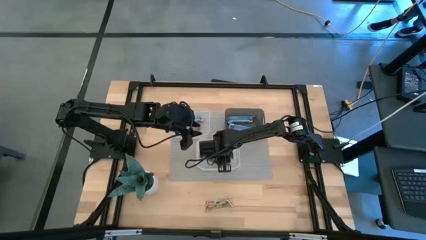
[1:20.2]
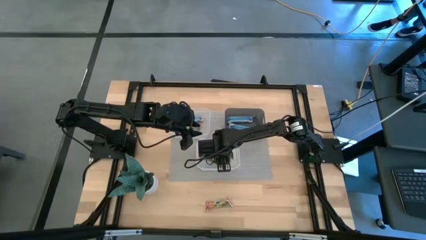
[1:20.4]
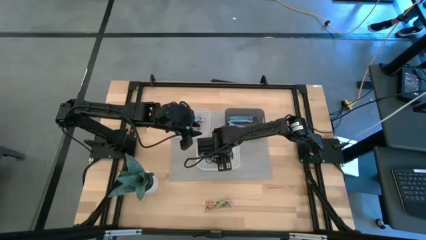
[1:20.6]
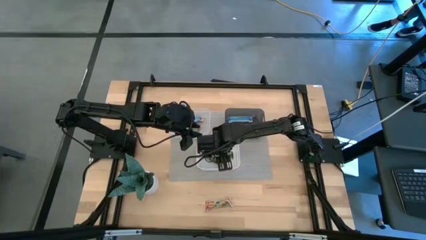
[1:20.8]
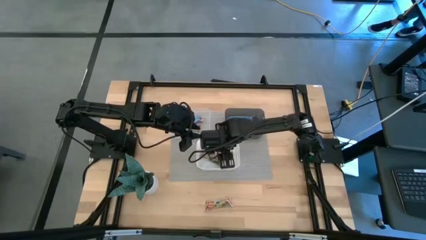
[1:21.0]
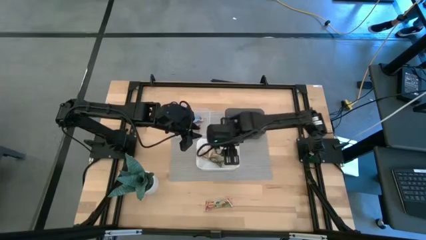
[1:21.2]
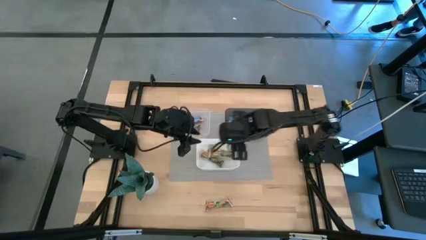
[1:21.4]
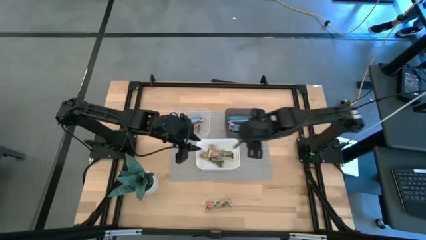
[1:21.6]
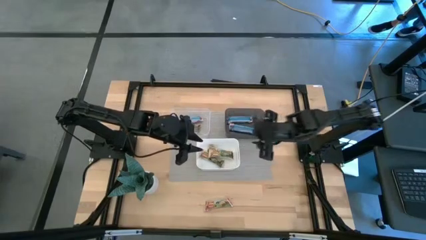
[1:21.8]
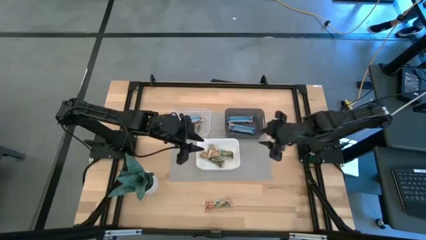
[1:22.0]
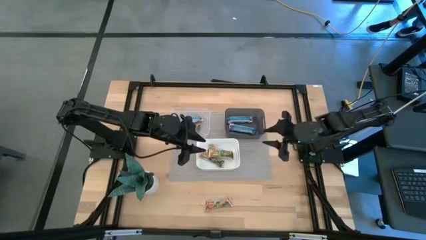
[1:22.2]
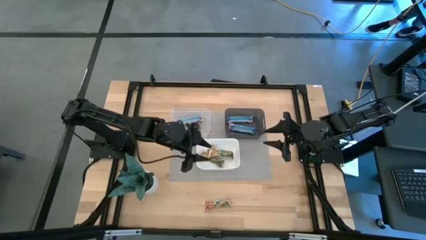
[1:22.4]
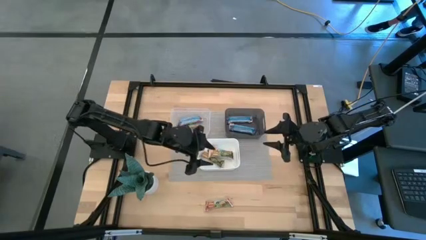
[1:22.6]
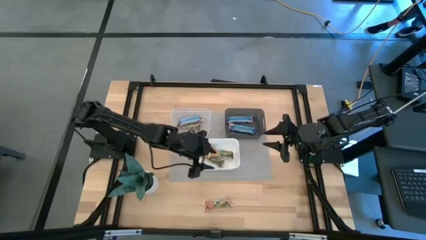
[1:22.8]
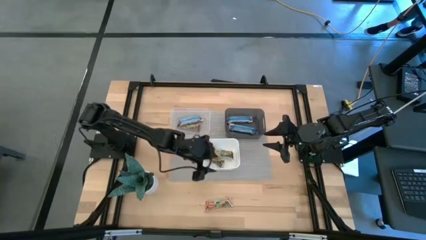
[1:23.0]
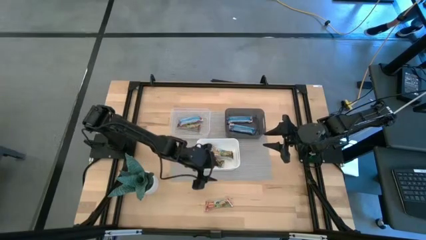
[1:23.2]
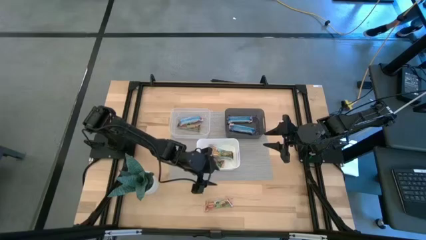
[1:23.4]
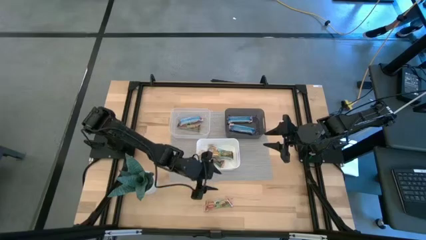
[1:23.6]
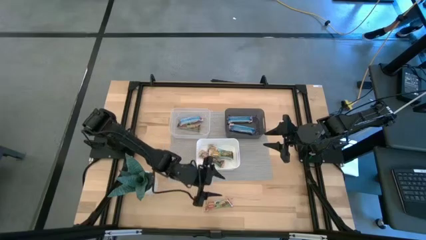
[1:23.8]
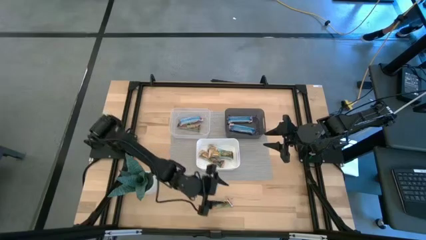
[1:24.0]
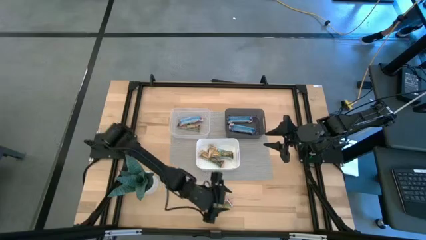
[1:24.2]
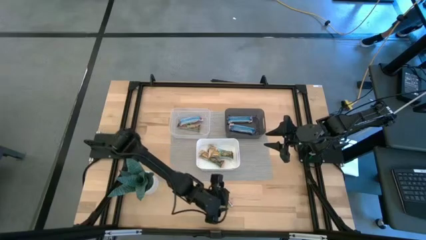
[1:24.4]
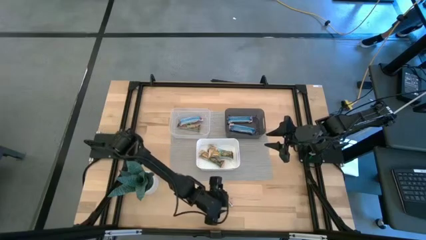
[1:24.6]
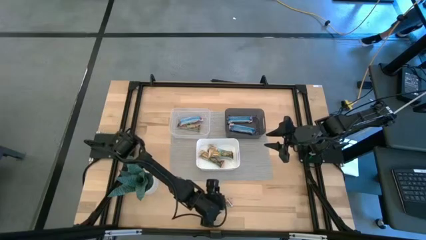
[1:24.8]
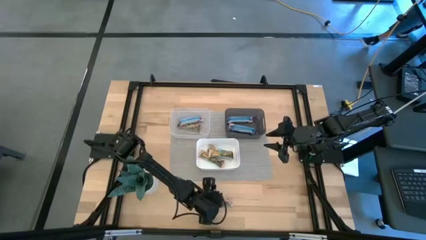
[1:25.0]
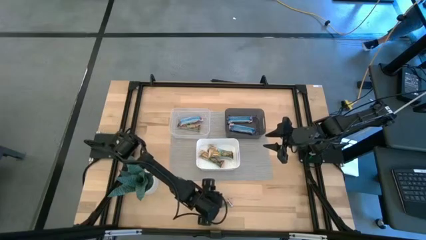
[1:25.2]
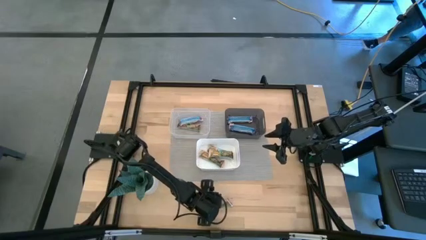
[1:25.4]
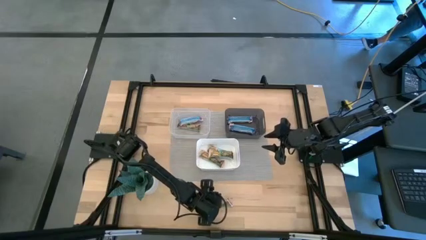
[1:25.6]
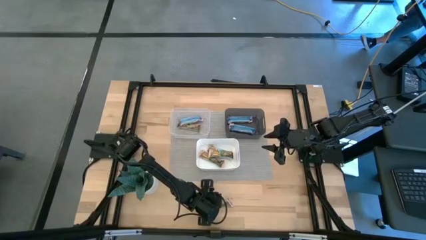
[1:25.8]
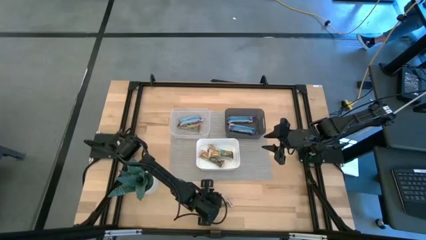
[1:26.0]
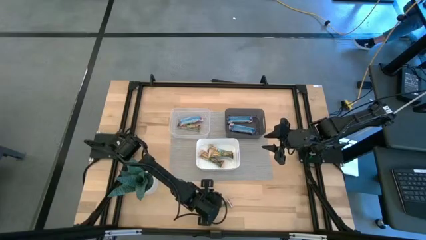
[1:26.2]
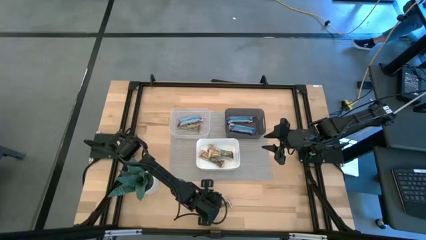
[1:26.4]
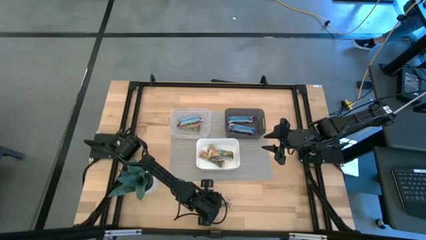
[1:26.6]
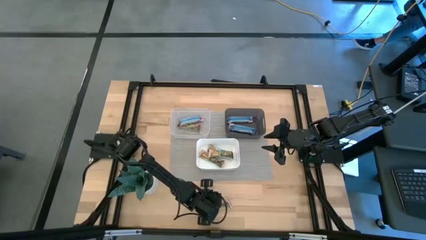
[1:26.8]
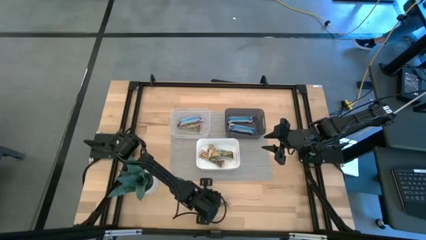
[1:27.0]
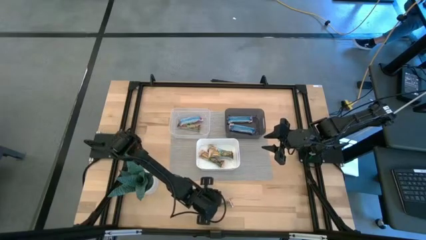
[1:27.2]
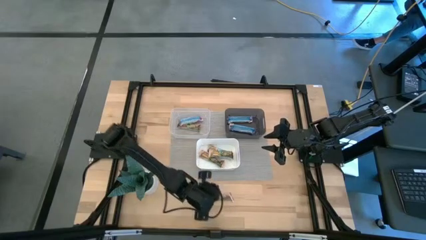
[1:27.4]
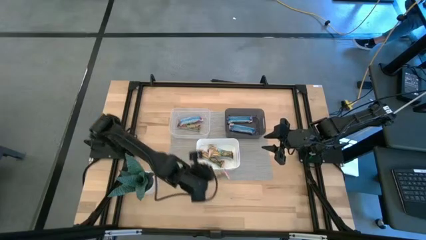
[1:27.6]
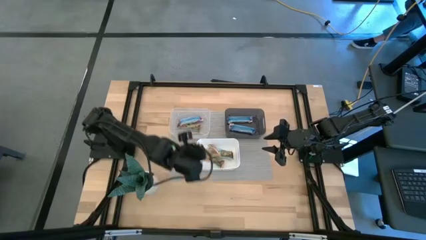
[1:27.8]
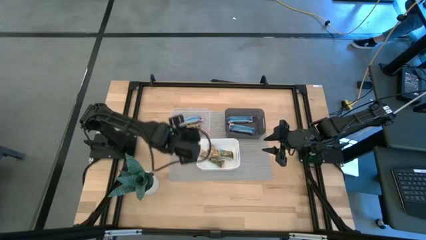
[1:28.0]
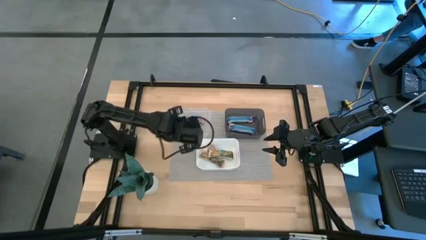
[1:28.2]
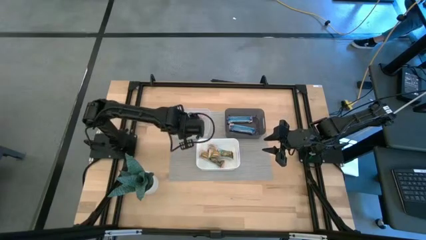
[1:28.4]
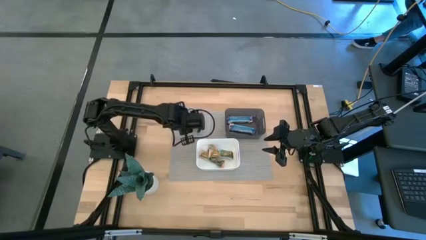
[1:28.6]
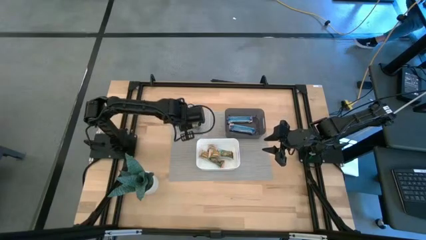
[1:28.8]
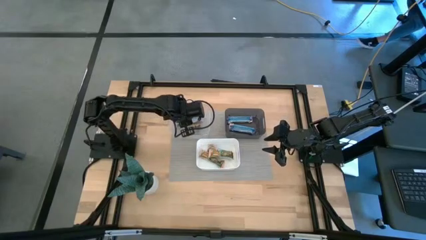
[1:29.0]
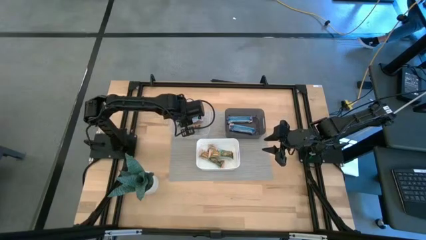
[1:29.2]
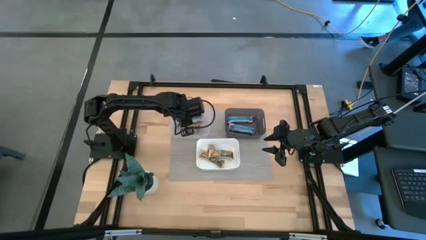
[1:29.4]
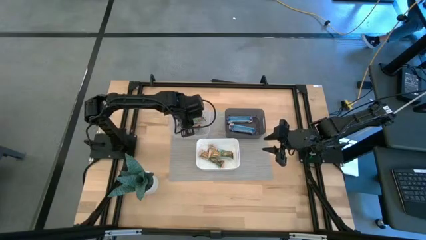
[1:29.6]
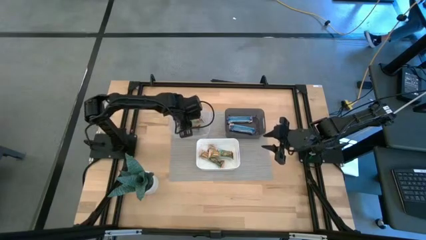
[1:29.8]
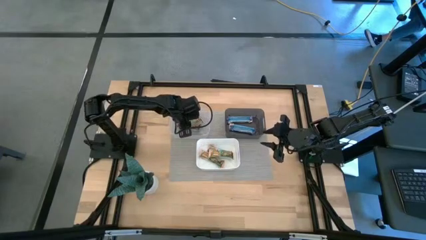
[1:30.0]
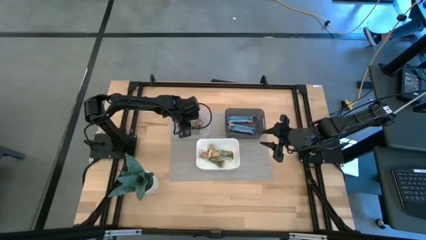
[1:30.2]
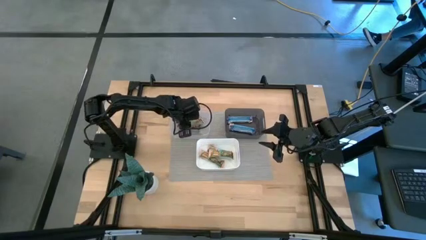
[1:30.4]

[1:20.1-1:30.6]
Task: Pick and place Granola Bars by type
Put the red granola bar into the transparent bin

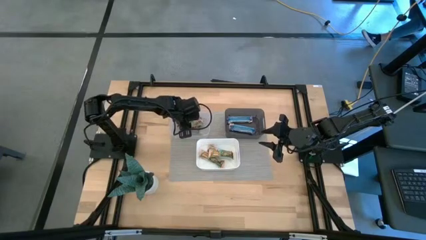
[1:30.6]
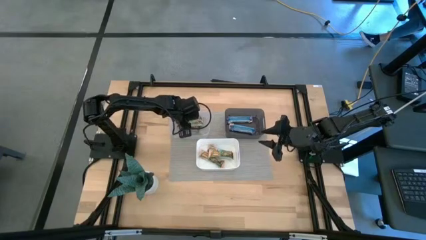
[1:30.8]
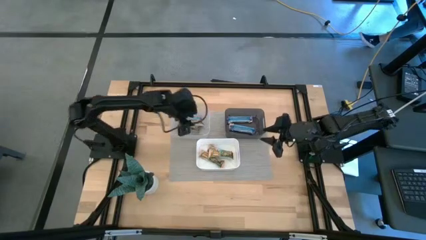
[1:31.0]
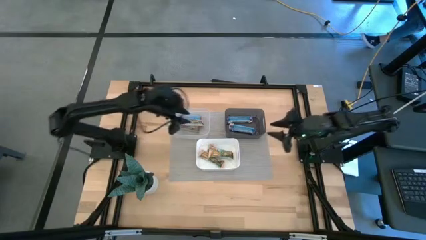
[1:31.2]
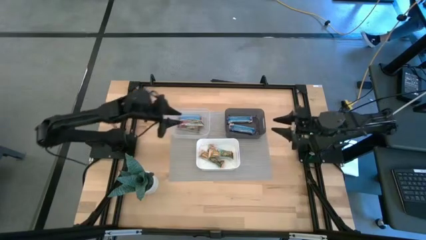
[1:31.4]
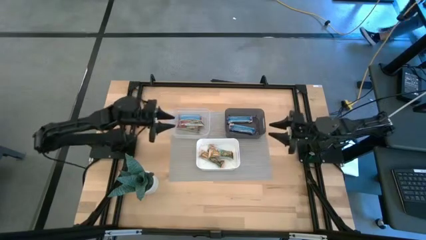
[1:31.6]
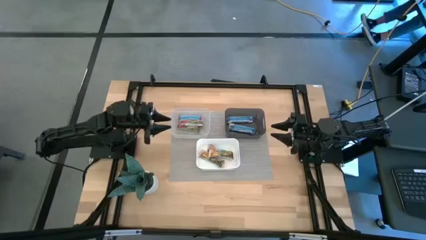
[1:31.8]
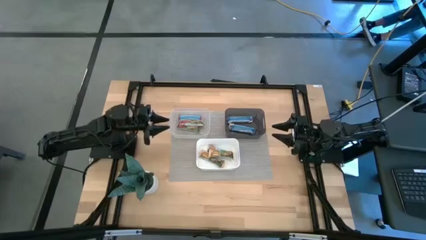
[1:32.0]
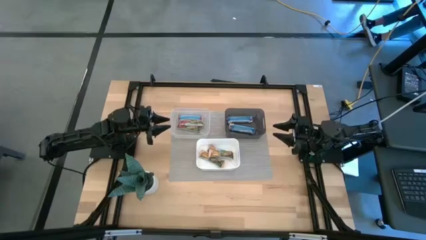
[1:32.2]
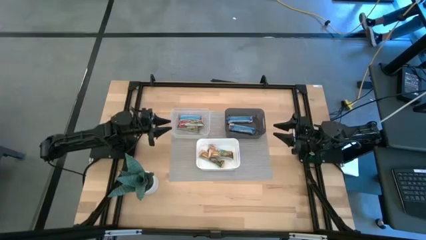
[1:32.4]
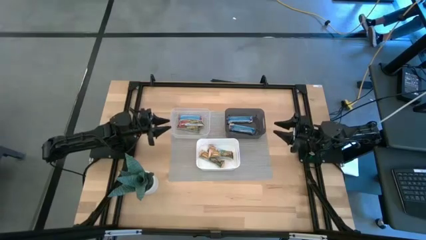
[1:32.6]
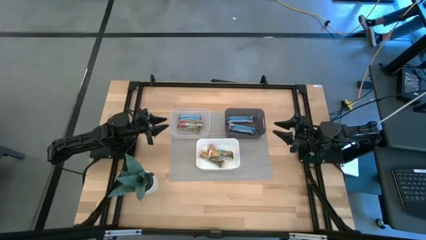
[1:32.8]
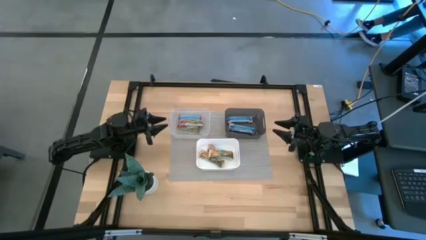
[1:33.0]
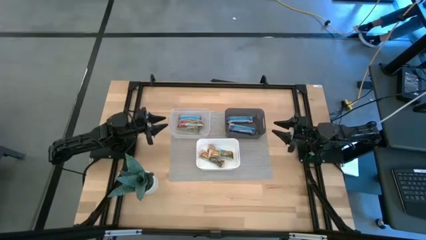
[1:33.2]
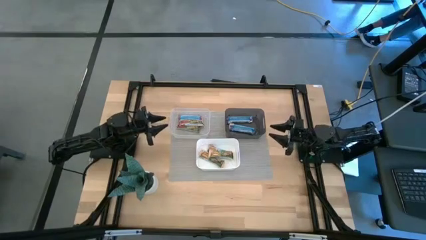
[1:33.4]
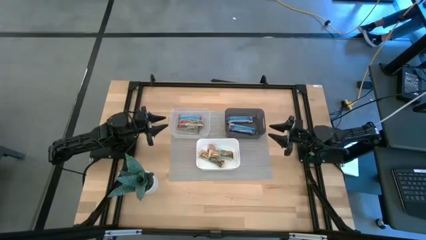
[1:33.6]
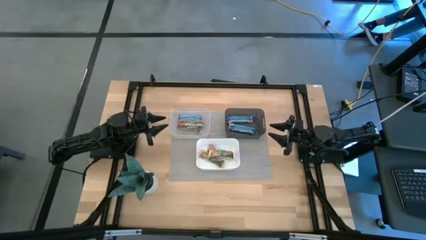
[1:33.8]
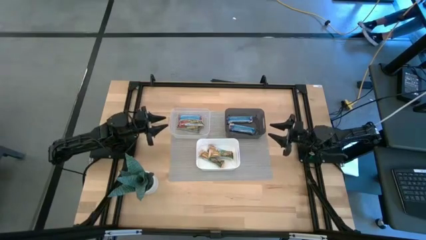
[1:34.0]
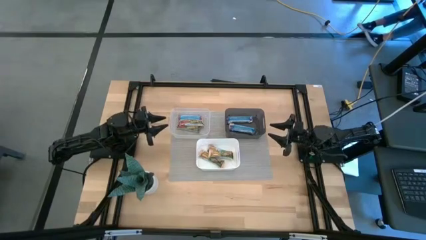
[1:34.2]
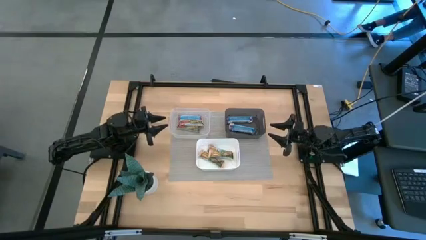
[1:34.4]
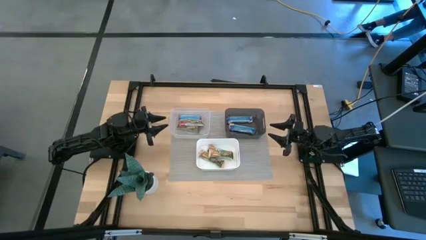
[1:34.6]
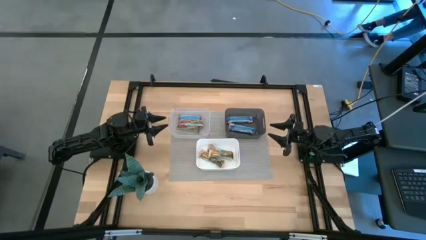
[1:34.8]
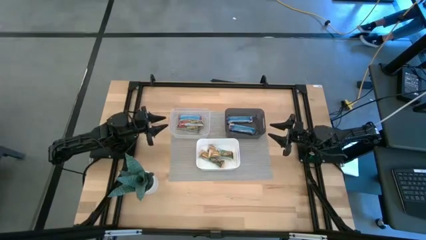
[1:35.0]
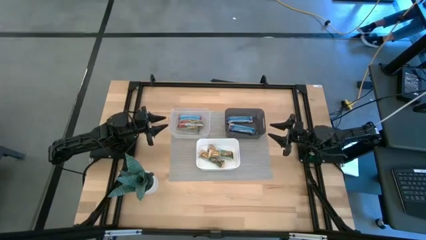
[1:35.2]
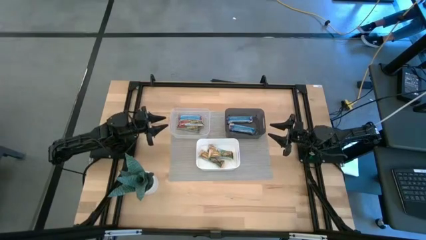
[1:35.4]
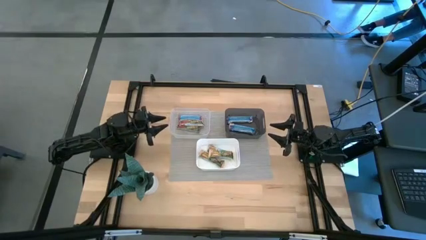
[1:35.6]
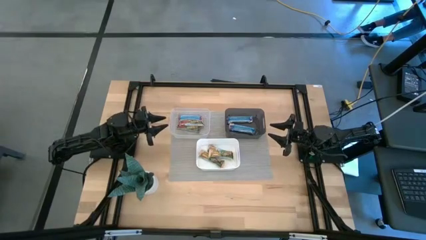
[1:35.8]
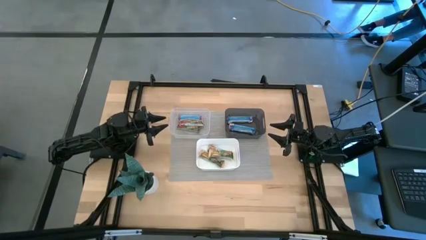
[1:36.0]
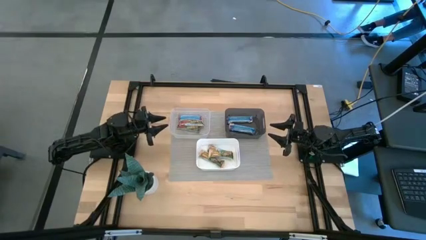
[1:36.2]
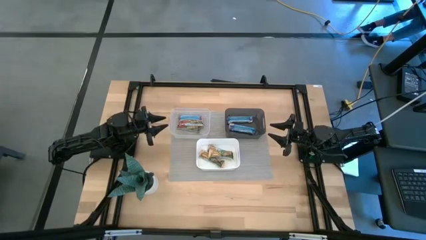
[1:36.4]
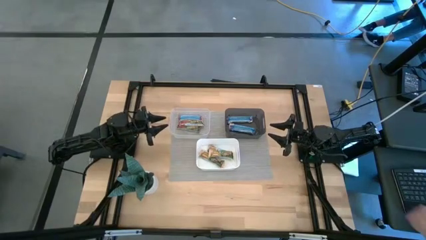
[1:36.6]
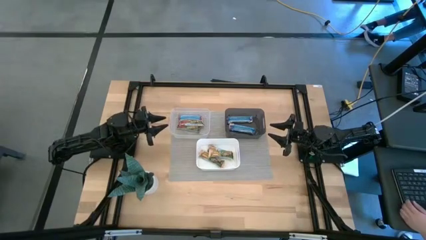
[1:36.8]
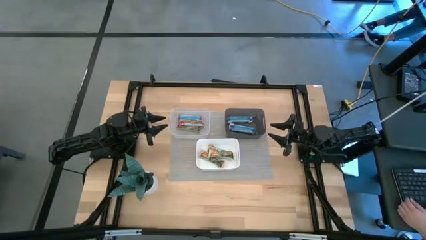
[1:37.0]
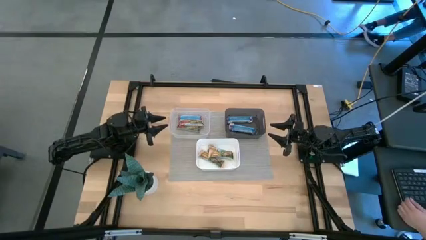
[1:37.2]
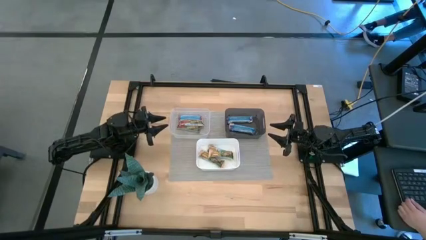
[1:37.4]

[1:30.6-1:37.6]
Return to Home Position
